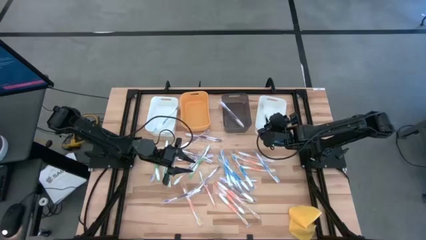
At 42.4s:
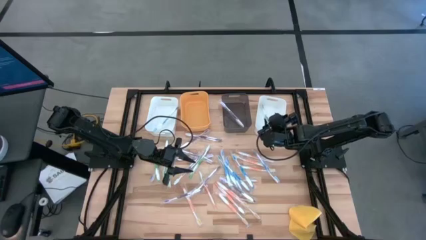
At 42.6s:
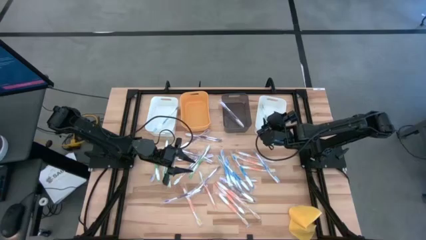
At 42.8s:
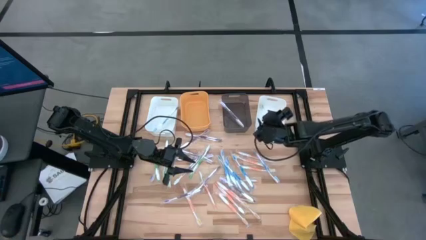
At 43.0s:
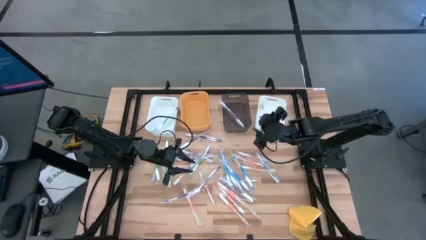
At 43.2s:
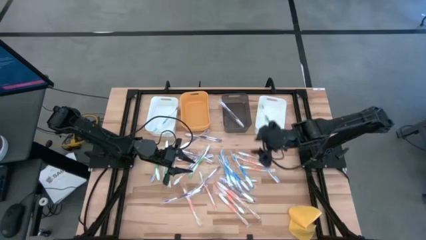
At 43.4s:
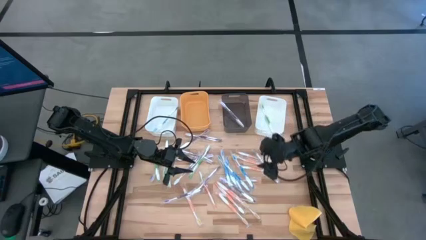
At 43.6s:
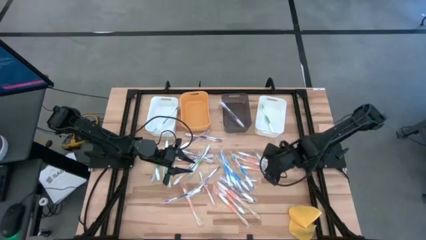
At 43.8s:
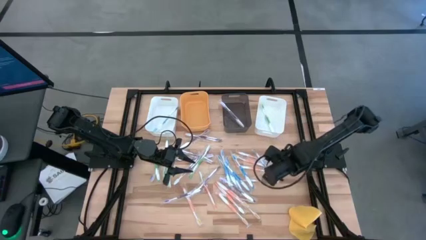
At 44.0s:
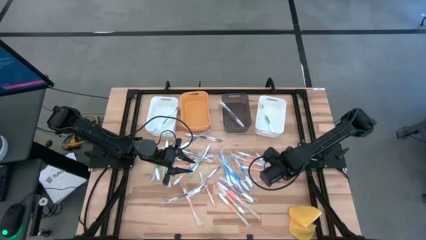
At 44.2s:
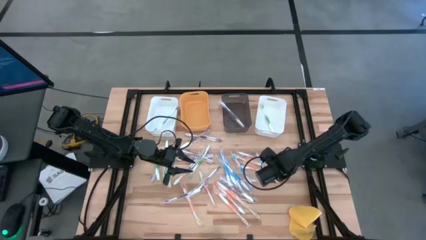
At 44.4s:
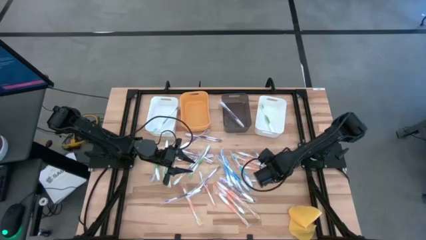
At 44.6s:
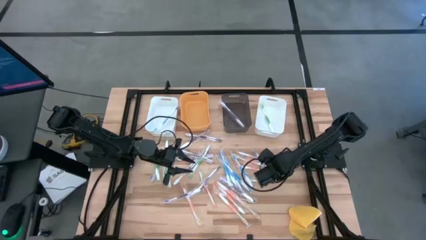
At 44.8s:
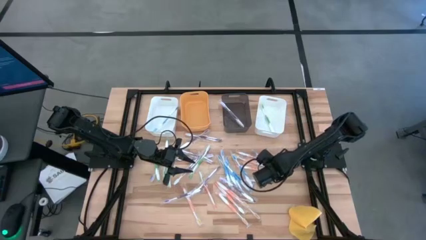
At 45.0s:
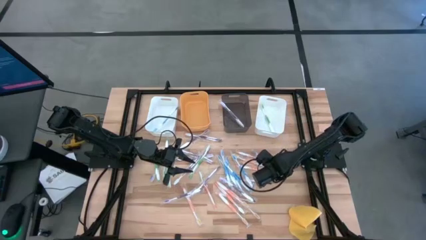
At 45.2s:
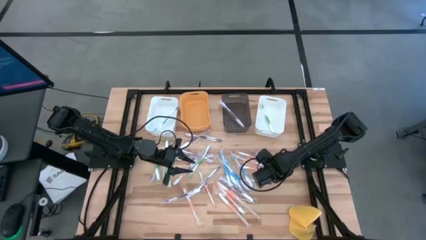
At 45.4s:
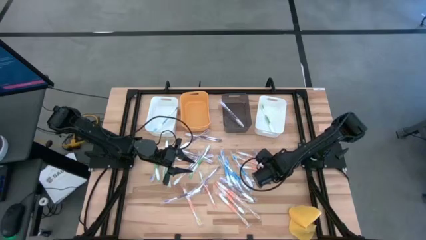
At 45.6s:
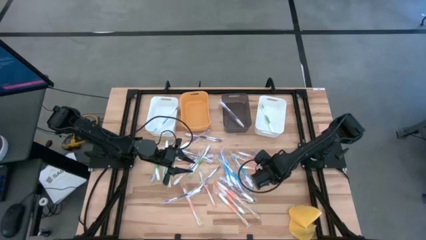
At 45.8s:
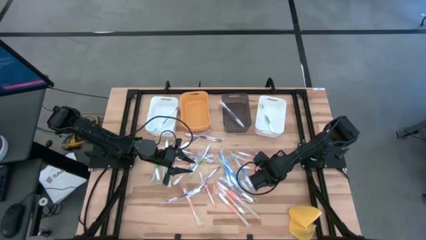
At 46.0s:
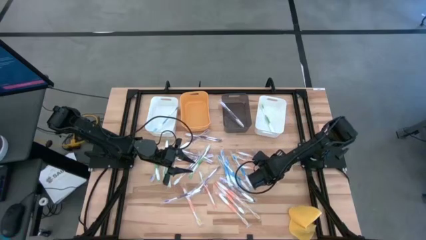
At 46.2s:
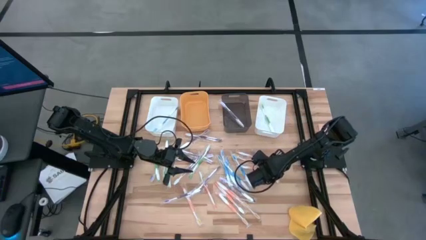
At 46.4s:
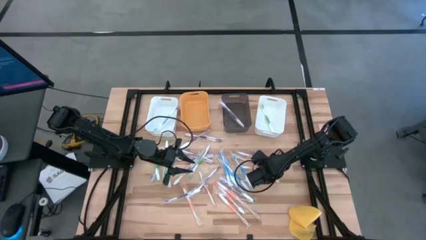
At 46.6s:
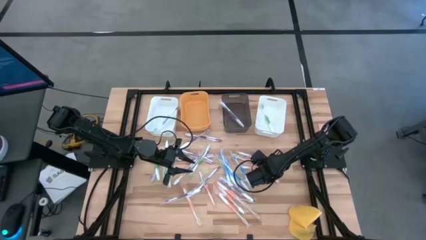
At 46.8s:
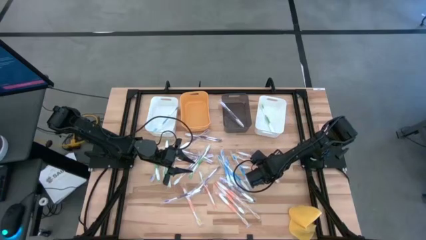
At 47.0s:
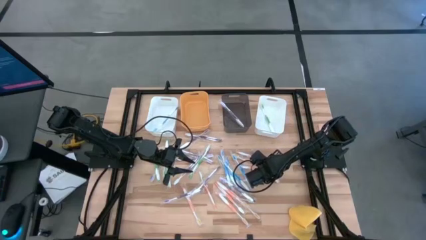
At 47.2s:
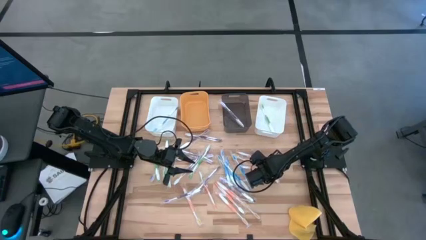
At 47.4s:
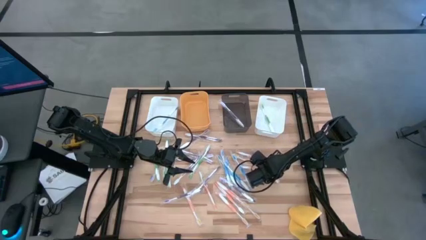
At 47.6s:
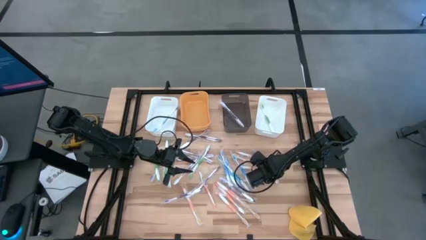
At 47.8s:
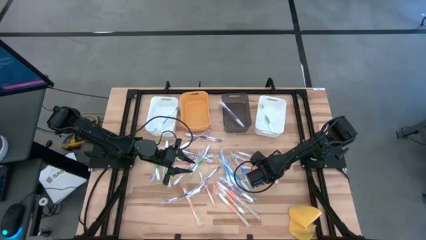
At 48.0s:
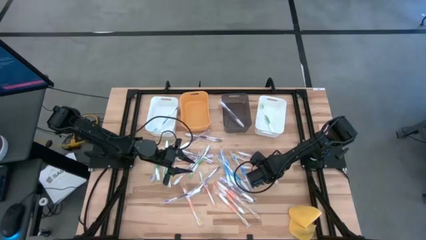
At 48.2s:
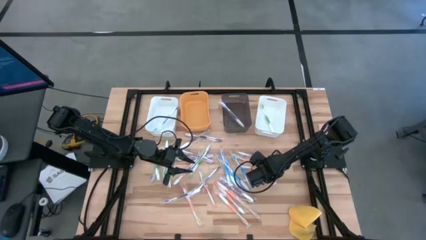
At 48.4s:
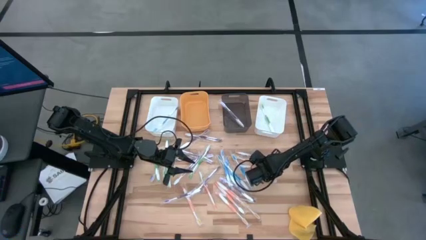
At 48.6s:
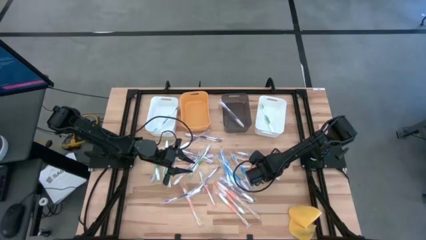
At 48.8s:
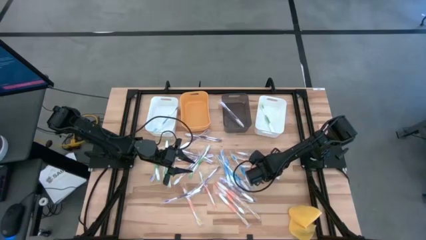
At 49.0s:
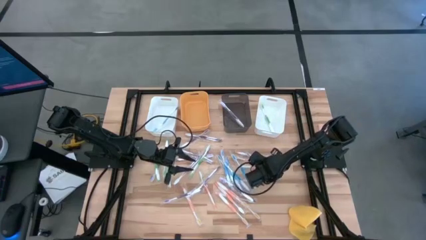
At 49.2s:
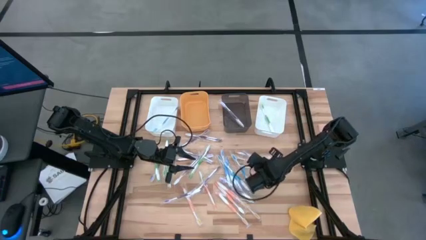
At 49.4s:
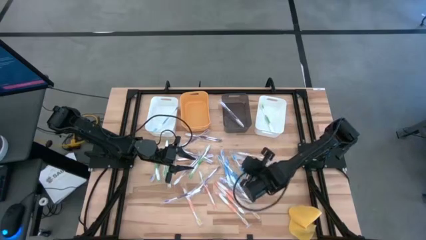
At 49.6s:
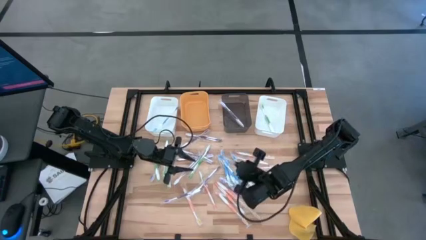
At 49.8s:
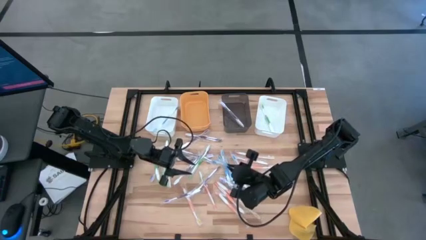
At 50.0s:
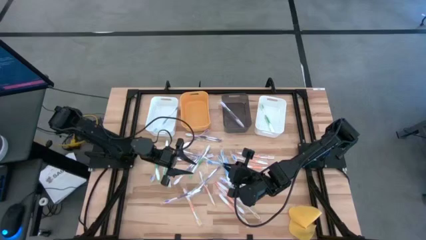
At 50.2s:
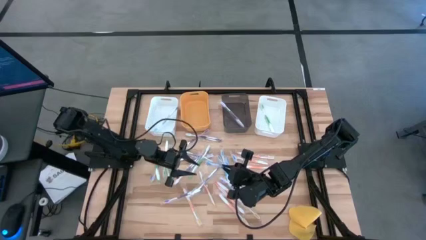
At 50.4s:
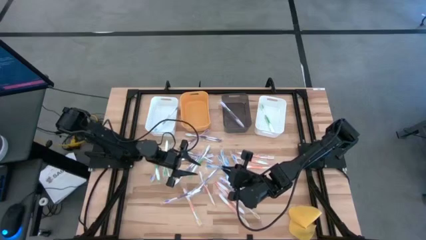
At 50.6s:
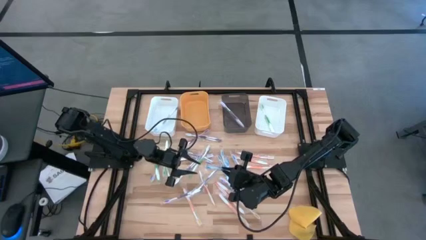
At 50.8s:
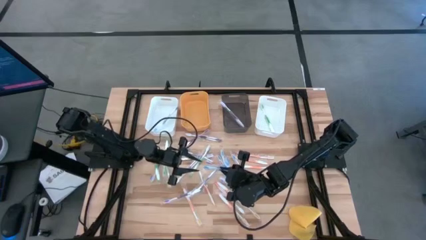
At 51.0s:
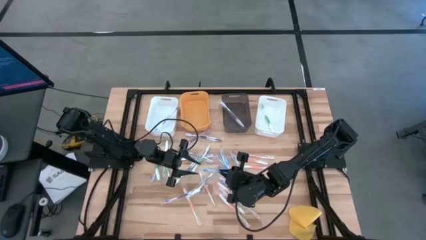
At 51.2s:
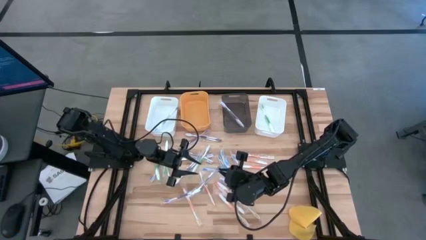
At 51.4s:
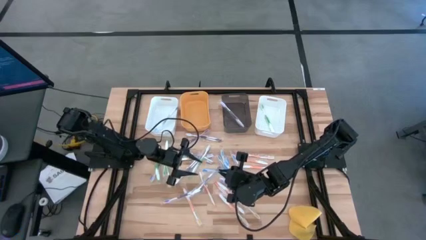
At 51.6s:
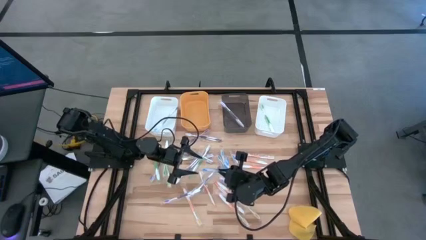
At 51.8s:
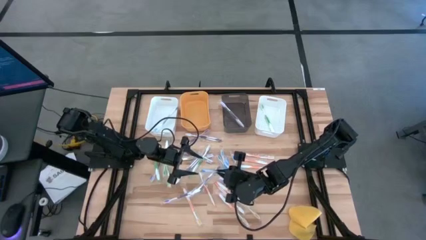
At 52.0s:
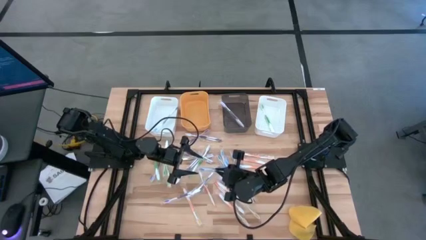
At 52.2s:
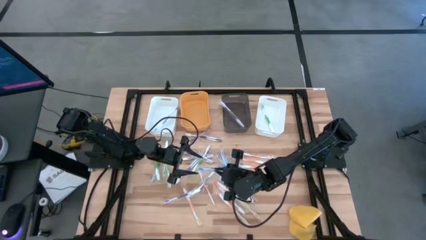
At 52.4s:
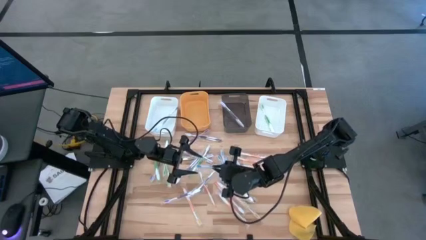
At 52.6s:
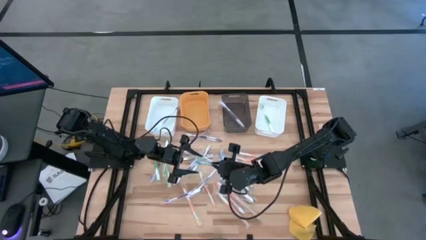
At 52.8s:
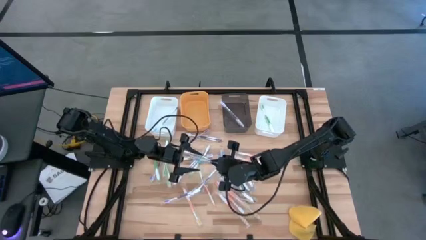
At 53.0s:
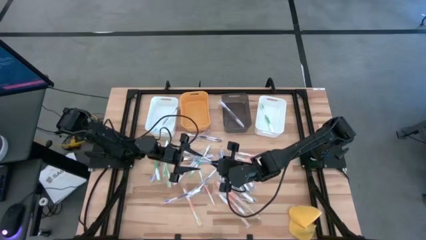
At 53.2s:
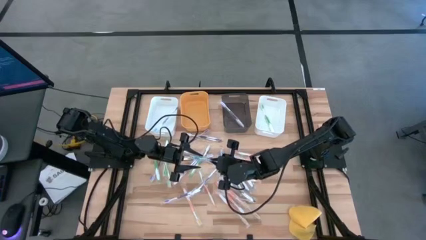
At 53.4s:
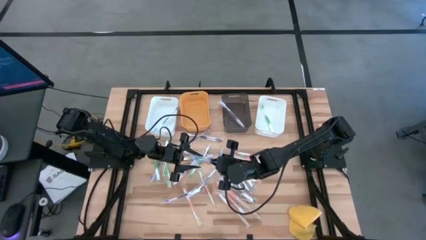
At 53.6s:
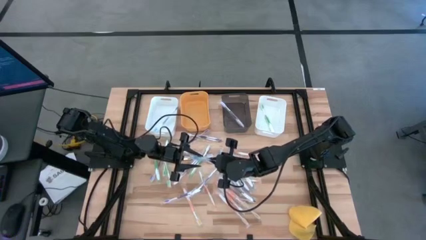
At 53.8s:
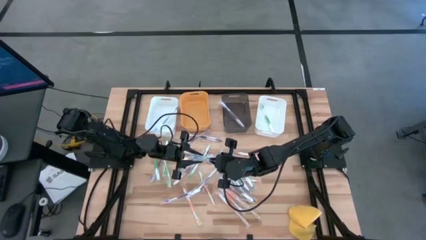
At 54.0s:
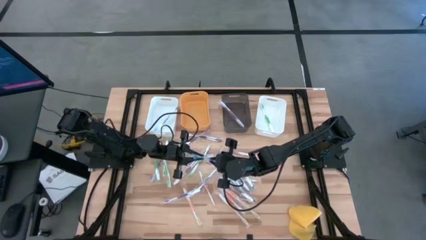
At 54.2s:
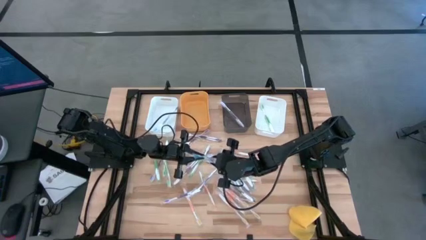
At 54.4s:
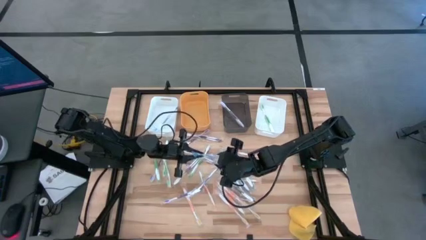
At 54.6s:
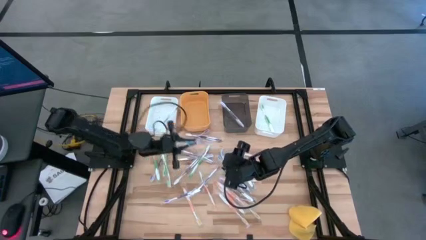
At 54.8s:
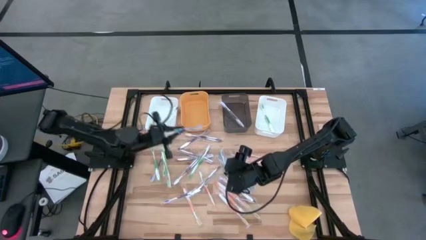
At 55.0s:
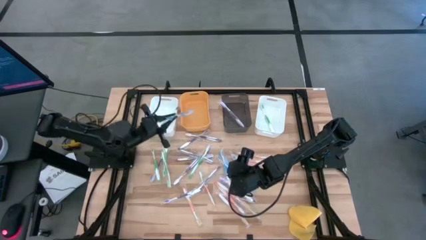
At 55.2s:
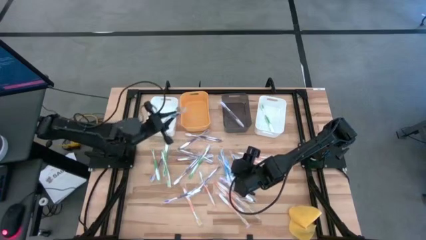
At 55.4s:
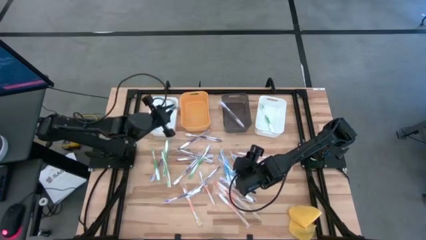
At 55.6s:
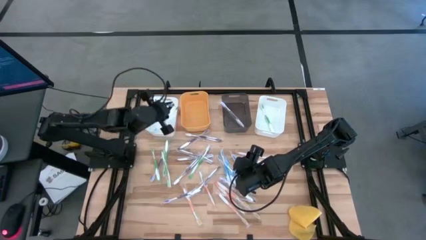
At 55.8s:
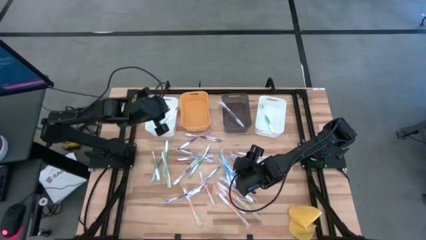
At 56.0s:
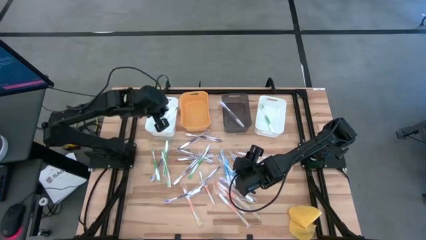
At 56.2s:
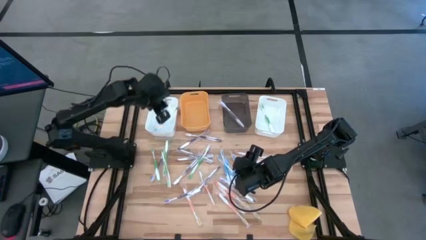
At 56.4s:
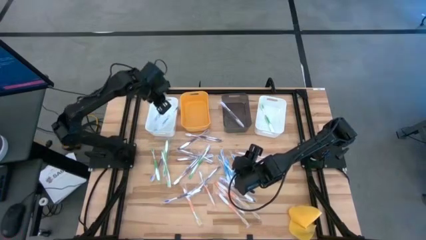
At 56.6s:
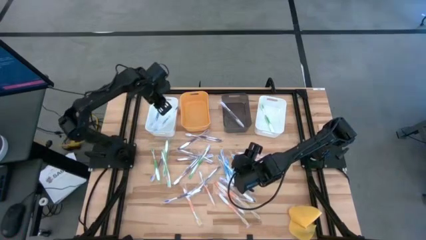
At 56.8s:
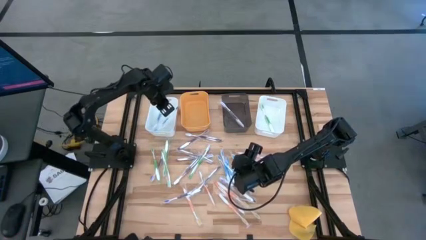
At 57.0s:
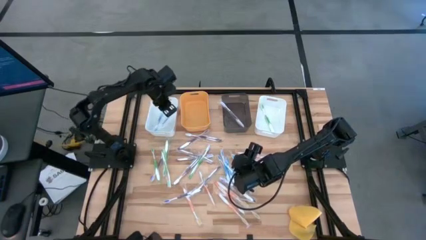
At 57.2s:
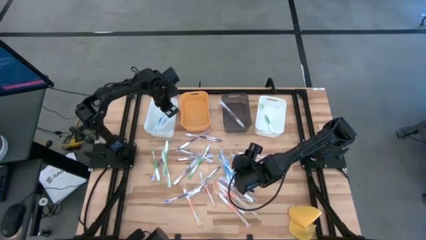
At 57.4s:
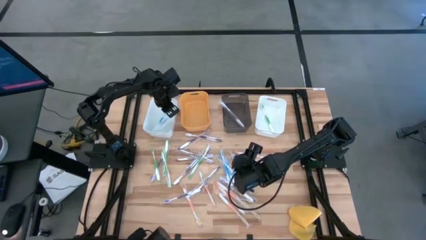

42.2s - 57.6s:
Task: Pick & Place Toothbrushes
Put the blue toothbrush into the left white bin
